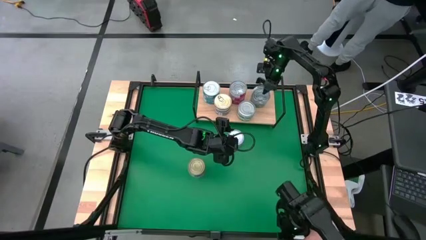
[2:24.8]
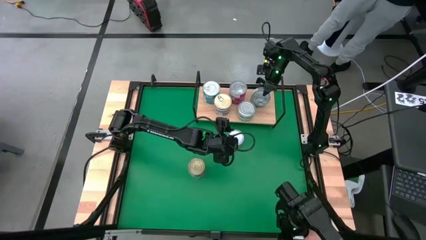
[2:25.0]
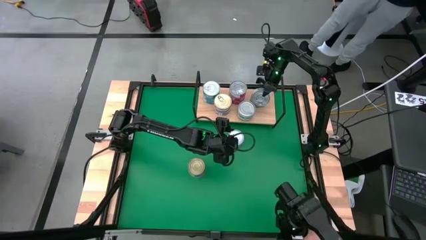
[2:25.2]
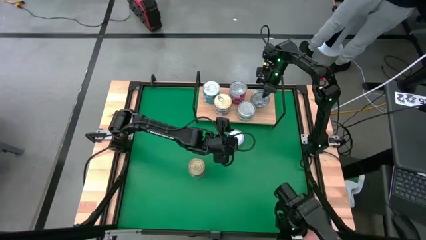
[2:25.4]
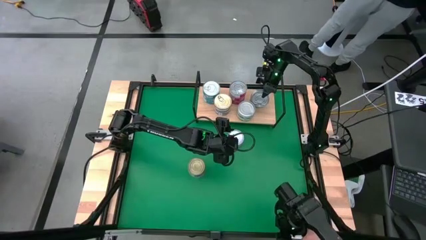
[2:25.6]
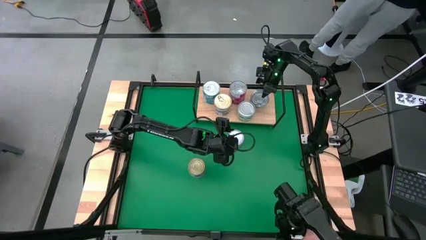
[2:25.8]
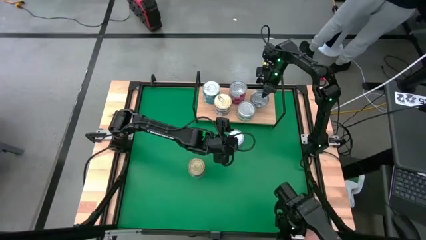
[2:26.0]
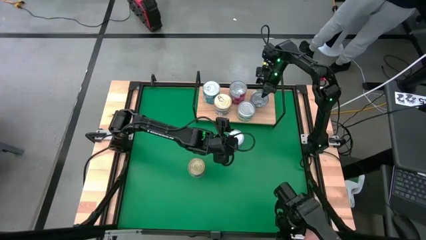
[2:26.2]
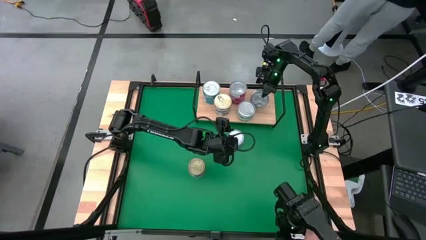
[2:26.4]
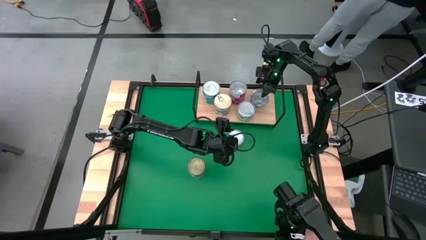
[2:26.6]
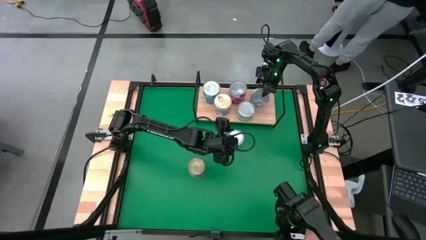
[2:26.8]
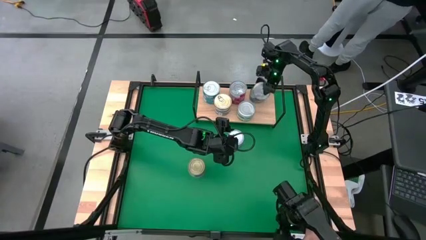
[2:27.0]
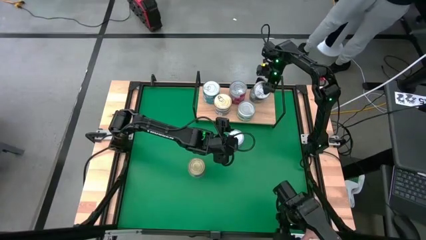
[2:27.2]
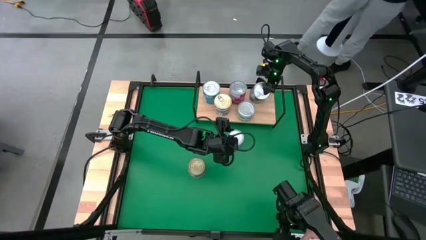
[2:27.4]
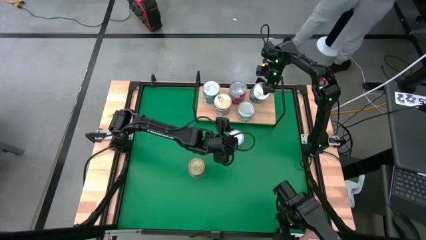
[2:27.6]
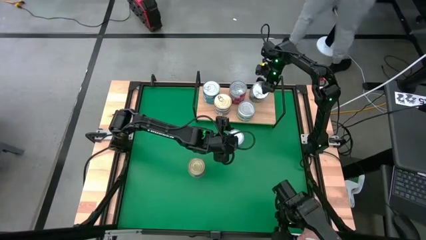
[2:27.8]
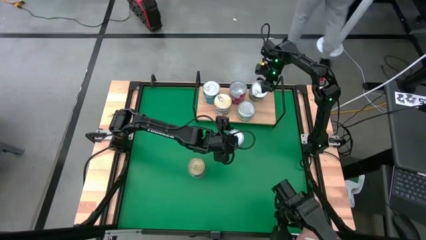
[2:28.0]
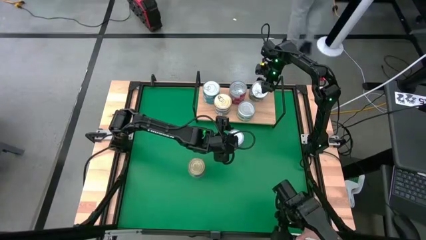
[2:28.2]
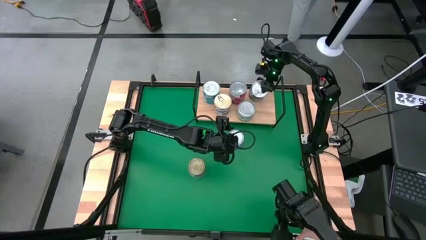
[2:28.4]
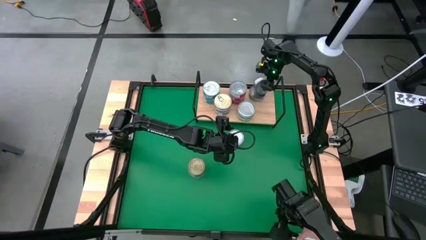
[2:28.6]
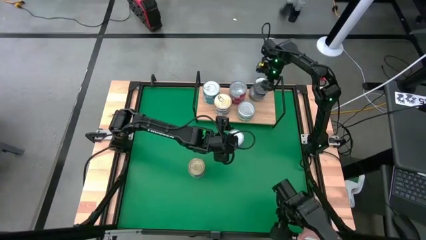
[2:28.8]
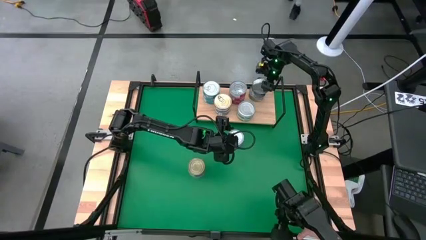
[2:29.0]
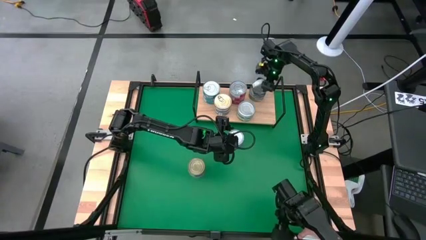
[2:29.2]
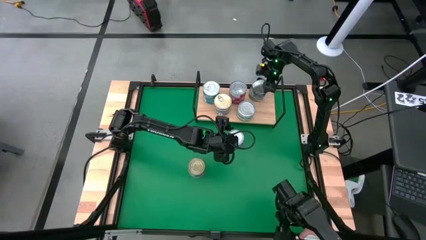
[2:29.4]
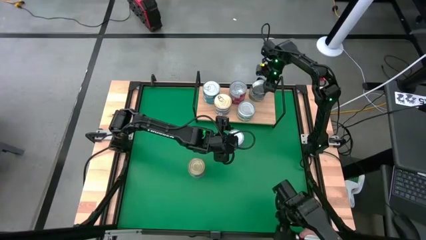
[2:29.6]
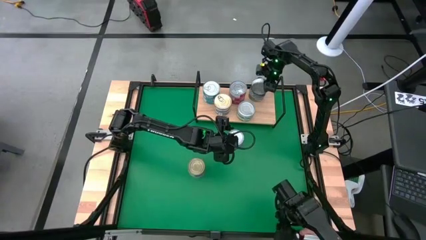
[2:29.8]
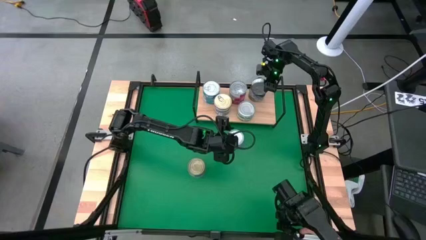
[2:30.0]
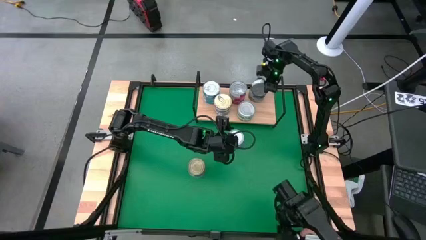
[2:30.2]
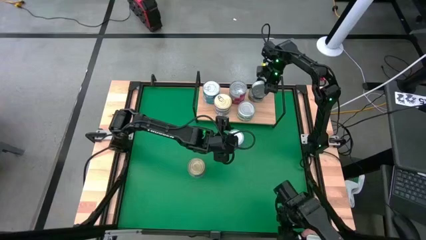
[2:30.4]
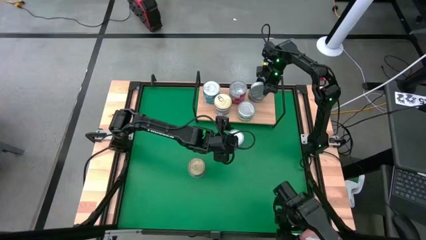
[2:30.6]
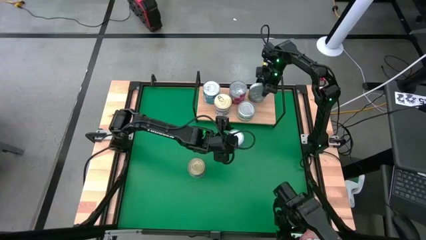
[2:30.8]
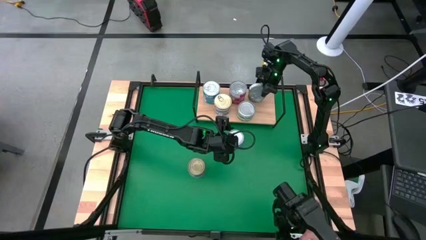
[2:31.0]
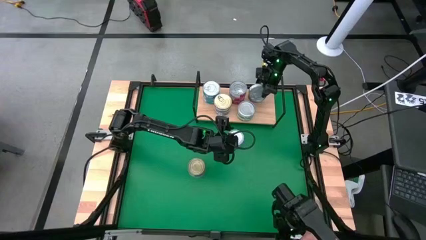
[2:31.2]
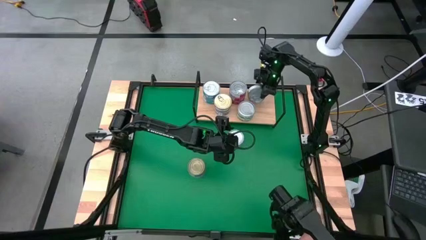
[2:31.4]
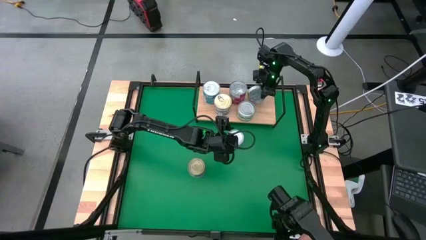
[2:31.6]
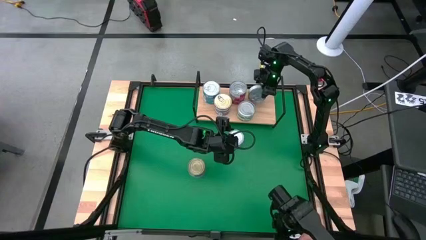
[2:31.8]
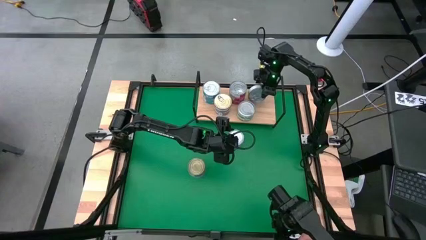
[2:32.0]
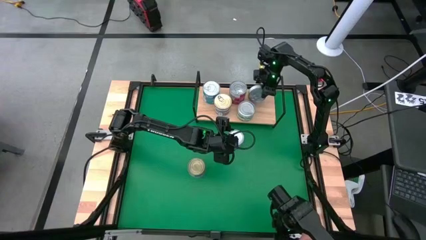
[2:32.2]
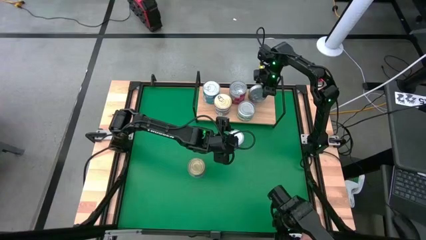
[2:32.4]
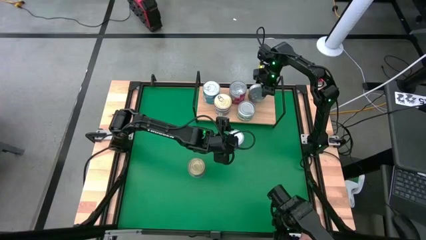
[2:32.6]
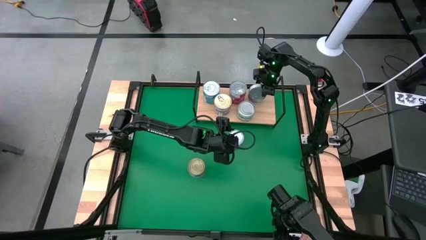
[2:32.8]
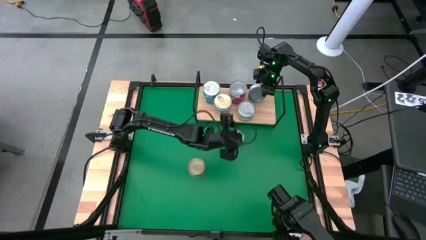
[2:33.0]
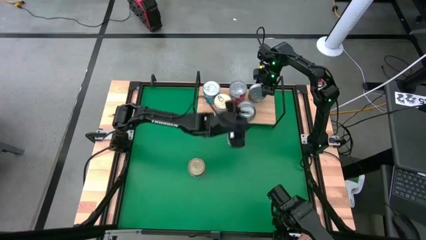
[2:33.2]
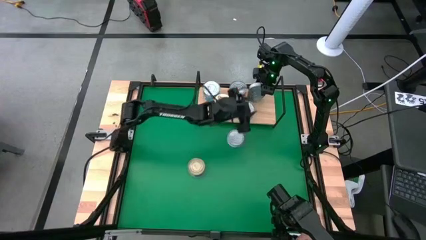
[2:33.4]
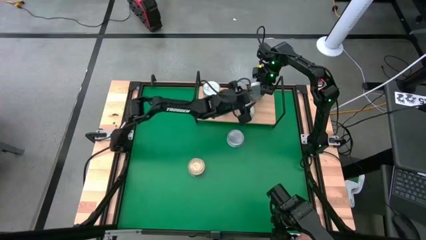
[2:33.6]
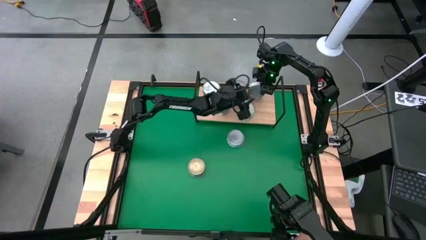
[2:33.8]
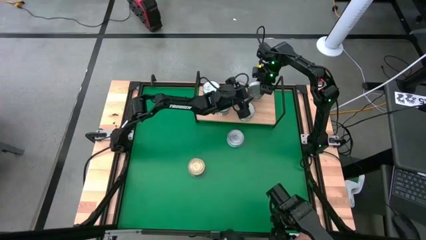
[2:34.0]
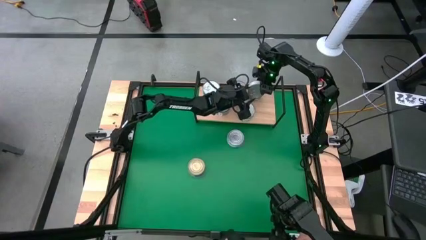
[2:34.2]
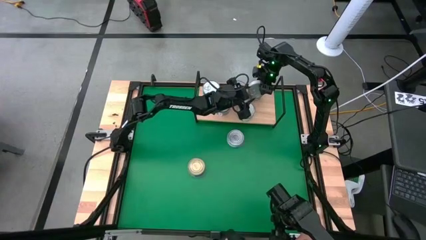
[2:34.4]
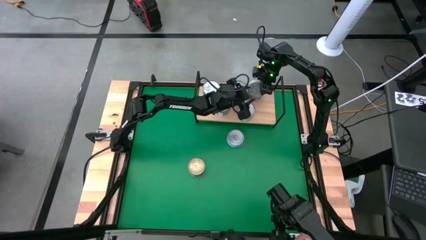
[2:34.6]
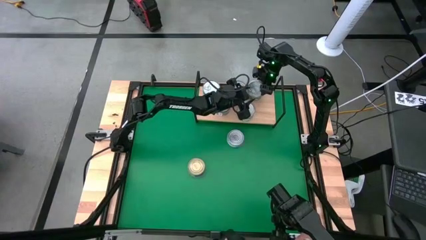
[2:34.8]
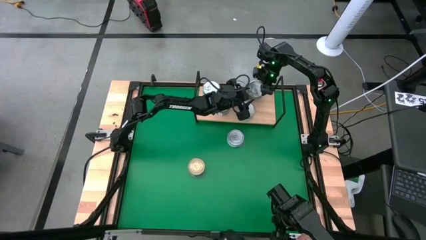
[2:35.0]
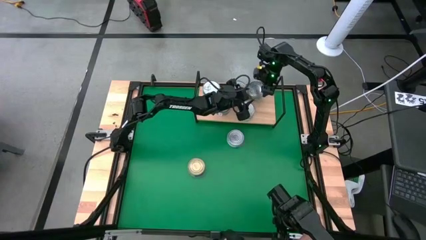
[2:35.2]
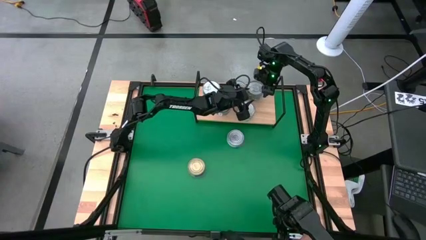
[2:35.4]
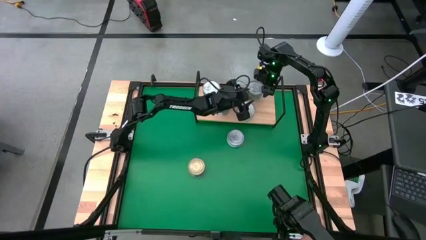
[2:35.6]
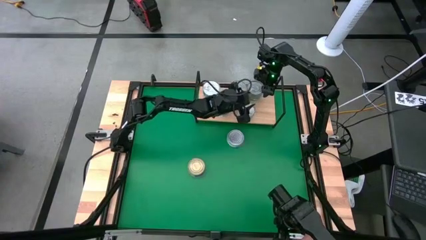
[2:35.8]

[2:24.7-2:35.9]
Task: Stack canned seafood by type on shelf
Stack the green tuna can on top of the green tuna can on the shelf

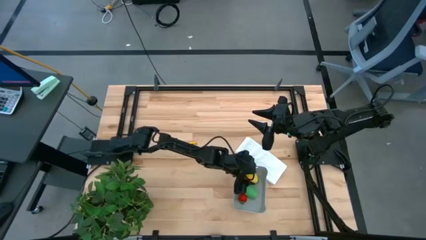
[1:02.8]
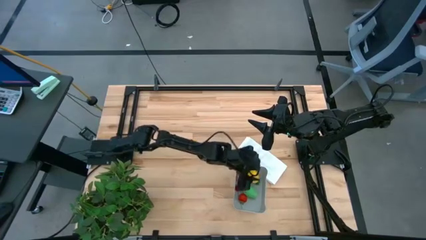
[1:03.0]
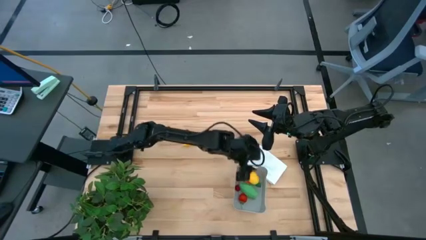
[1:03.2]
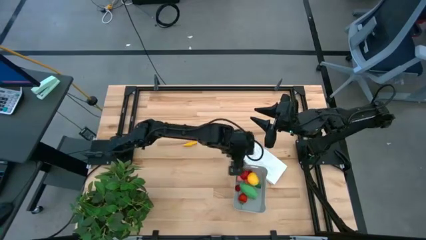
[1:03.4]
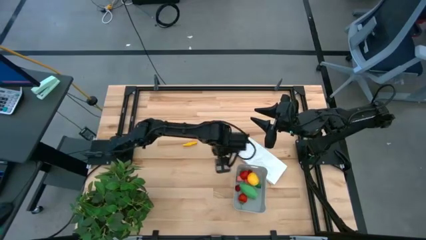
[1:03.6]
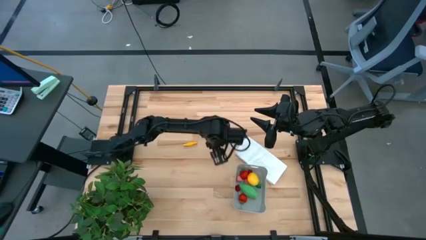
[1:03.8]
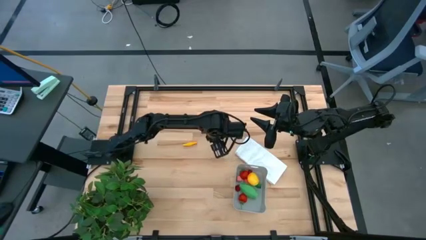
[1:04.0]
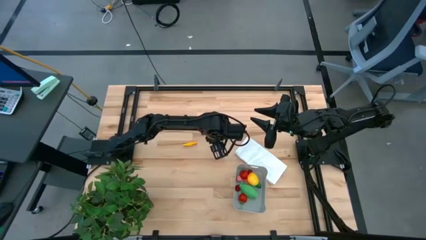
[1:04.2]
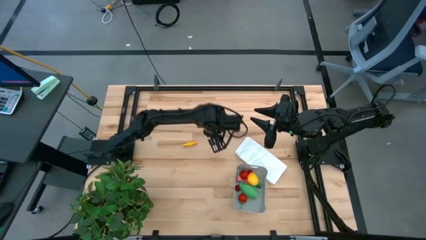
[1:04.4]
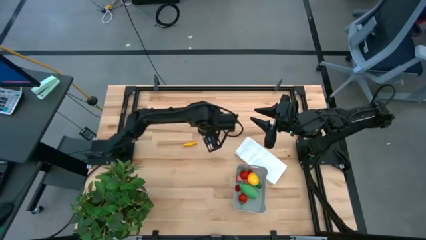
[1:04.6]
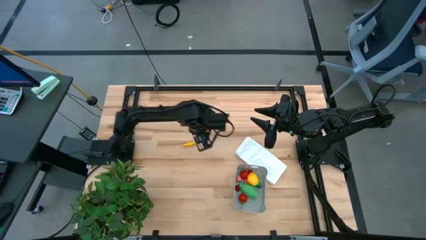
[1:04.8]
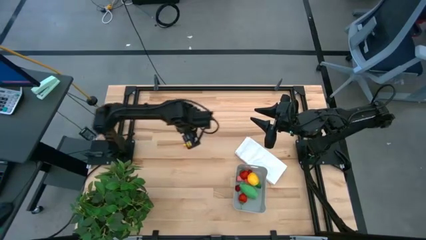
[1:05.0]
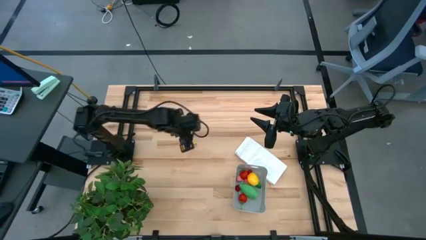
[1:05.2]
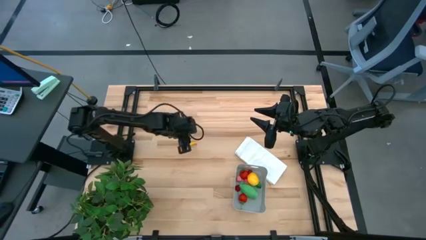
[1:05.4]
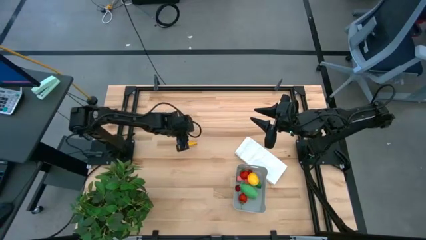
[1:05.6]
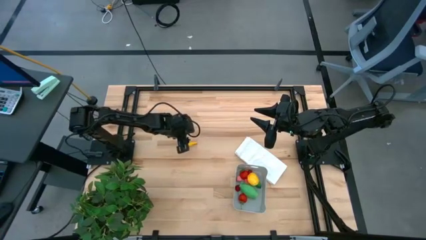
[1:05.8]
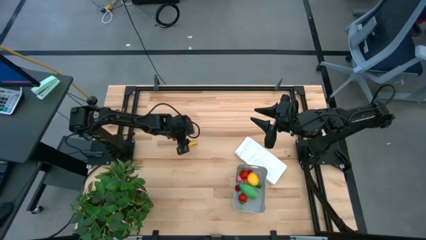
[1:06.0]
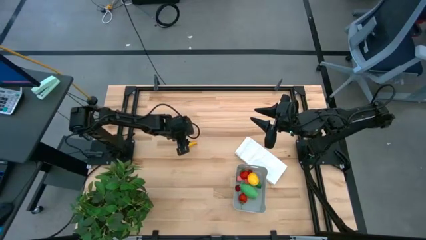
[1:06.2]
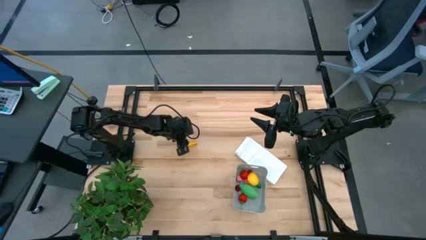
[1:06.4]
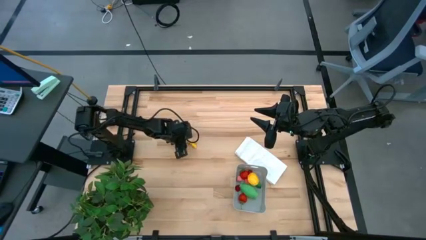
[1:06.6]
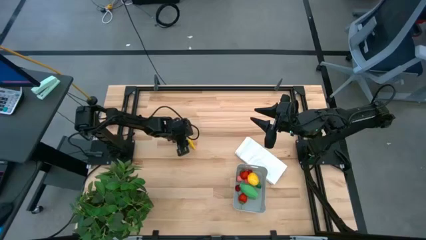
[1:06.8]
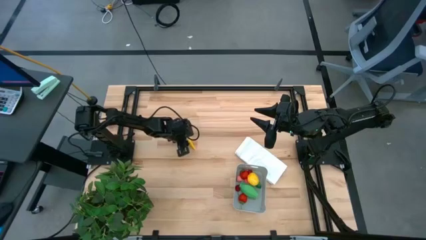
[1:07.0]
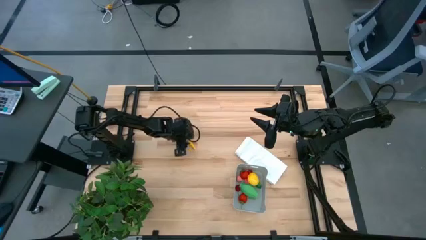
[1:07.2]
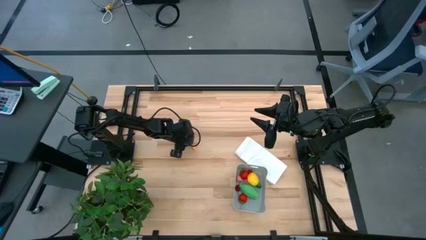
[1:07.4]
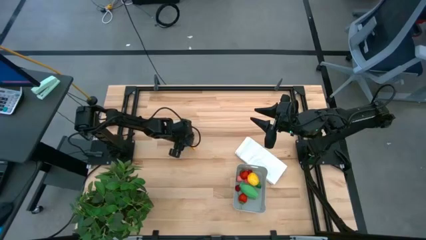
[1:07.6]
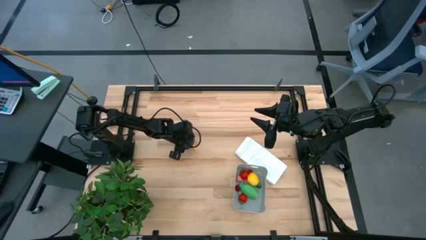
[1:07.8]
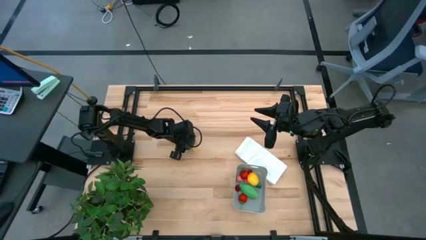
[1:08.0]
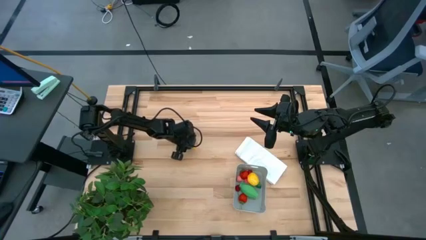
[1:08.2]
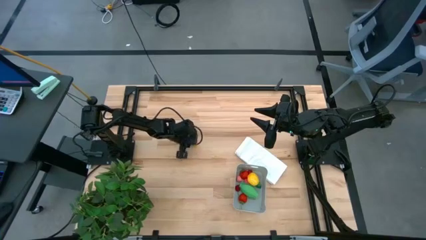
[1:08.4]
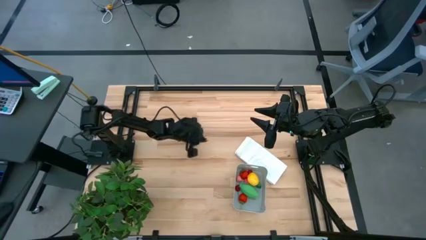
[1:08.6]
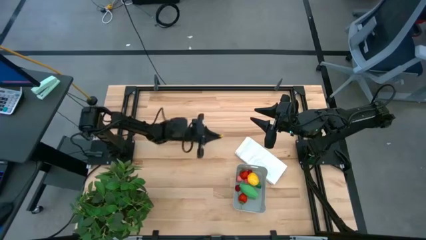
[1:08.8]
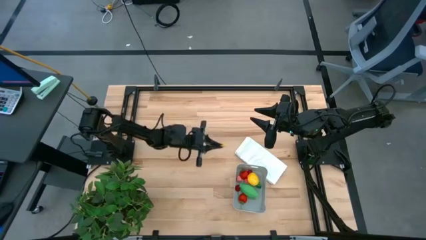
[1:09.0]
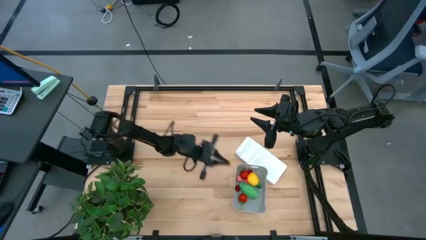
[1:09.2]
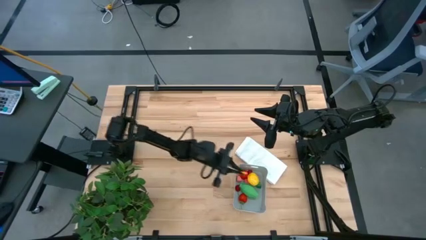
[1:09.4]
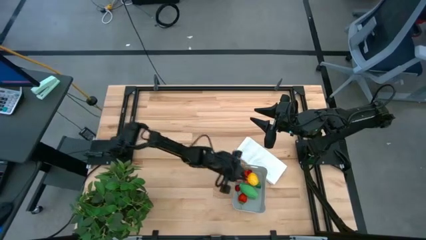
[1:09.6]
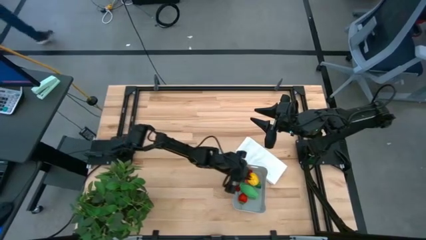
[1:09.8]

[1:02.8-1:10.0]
Task: Pick and placing Produce into tupperware
Put the yellow corn into the gray bin
